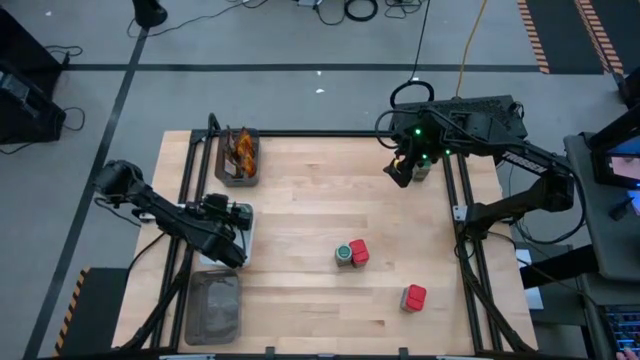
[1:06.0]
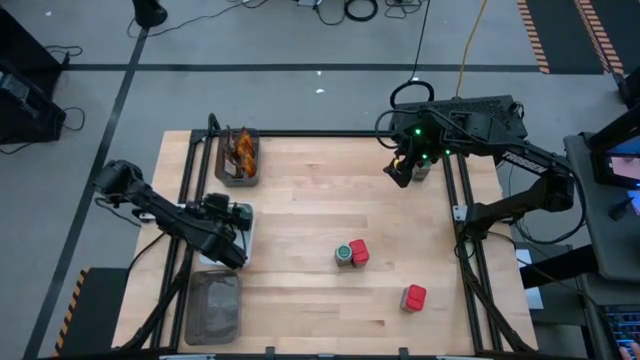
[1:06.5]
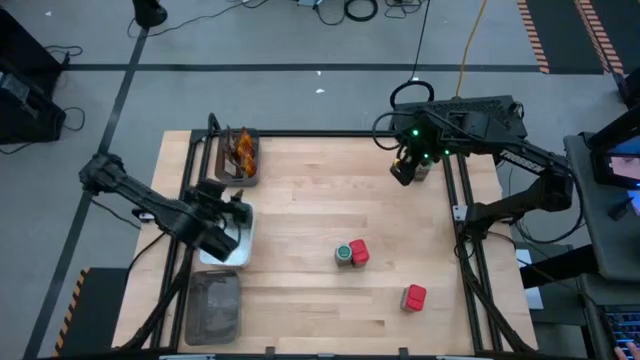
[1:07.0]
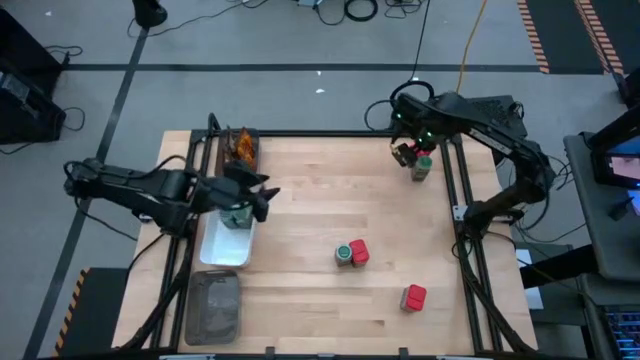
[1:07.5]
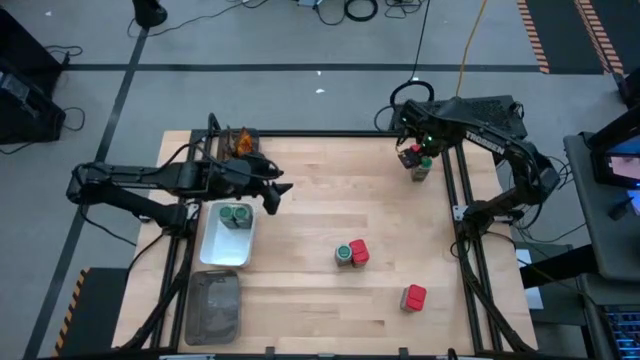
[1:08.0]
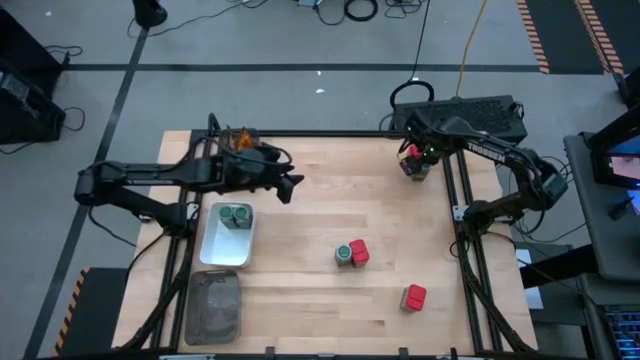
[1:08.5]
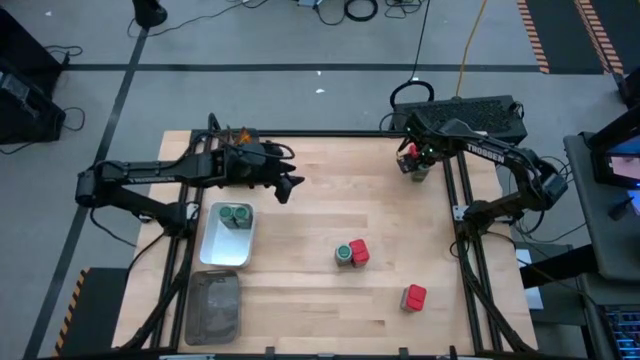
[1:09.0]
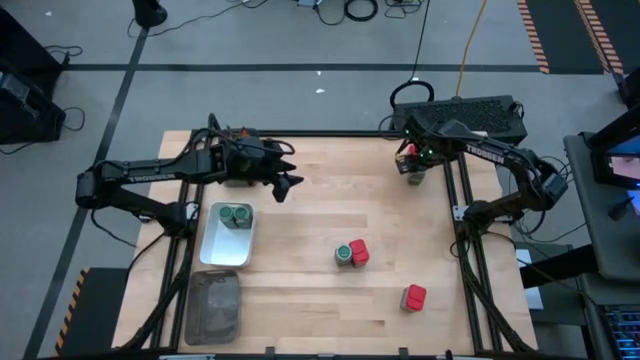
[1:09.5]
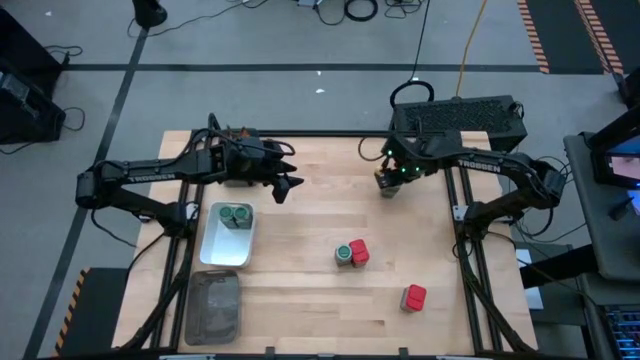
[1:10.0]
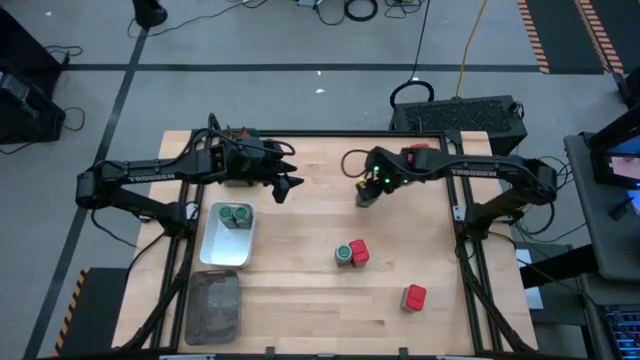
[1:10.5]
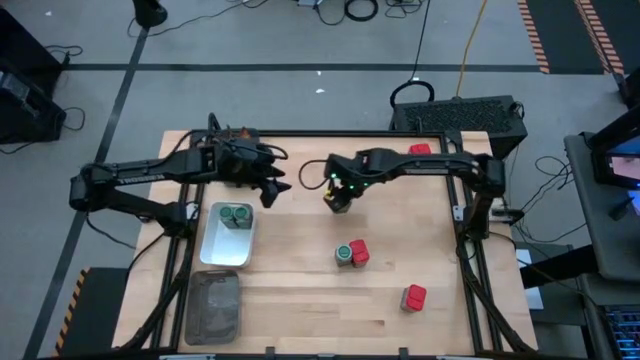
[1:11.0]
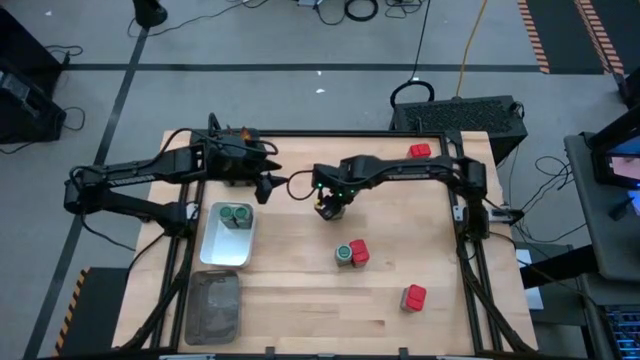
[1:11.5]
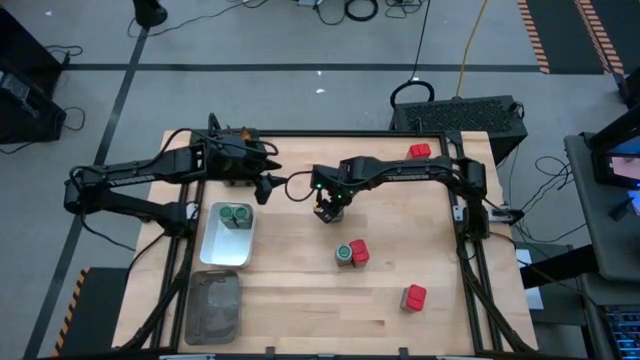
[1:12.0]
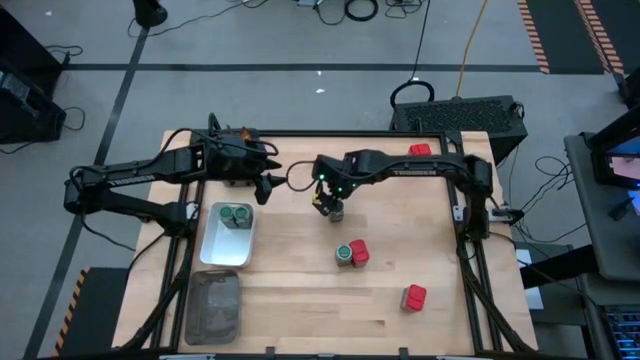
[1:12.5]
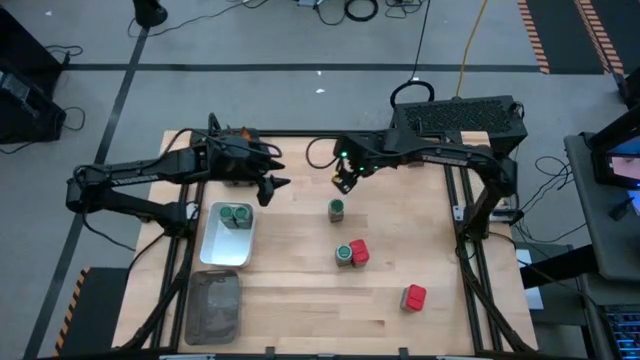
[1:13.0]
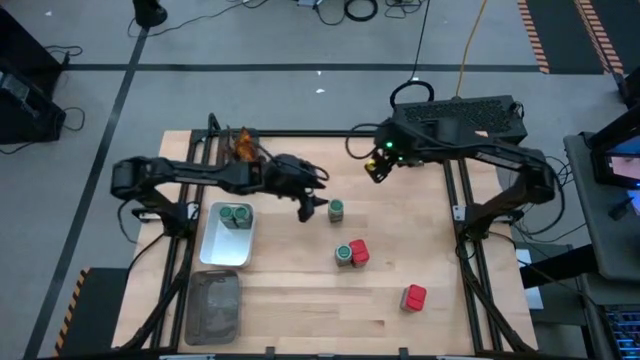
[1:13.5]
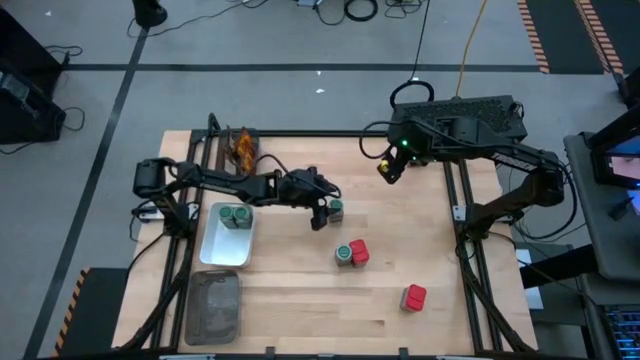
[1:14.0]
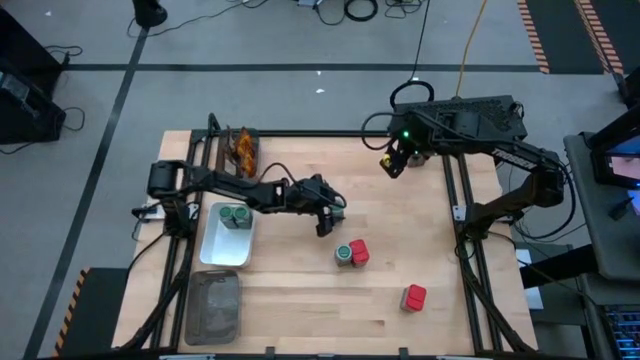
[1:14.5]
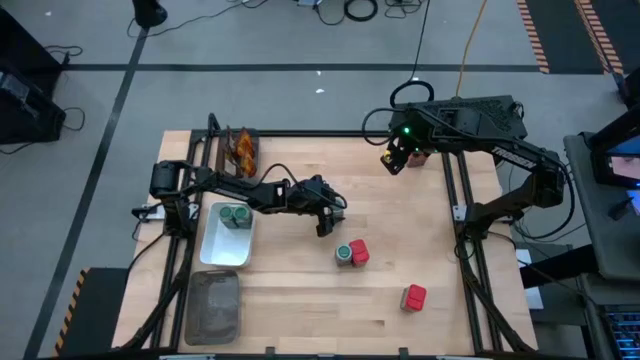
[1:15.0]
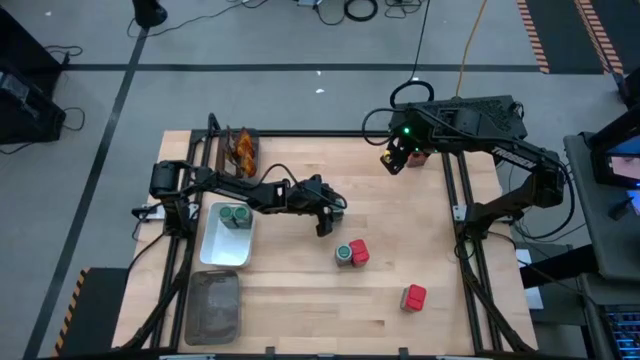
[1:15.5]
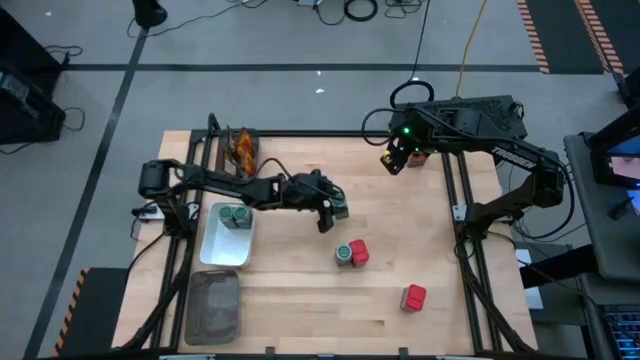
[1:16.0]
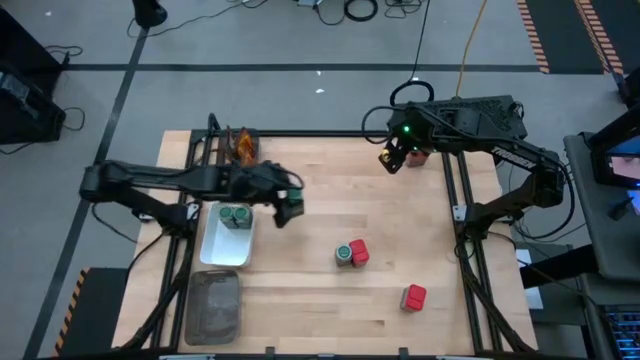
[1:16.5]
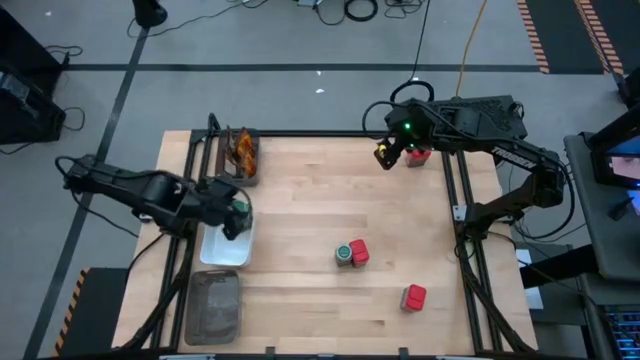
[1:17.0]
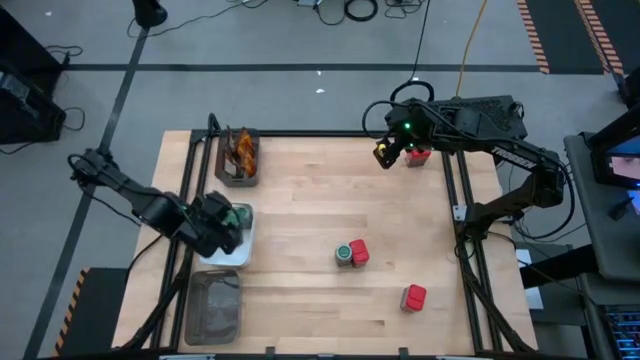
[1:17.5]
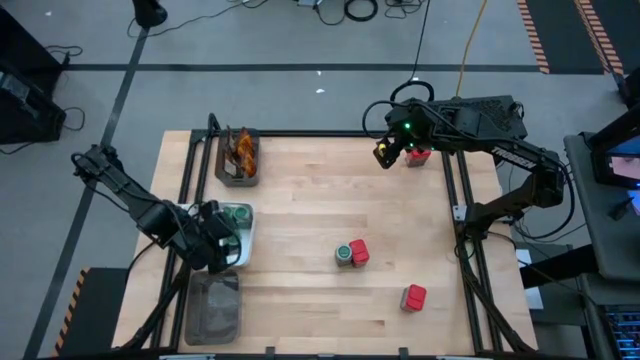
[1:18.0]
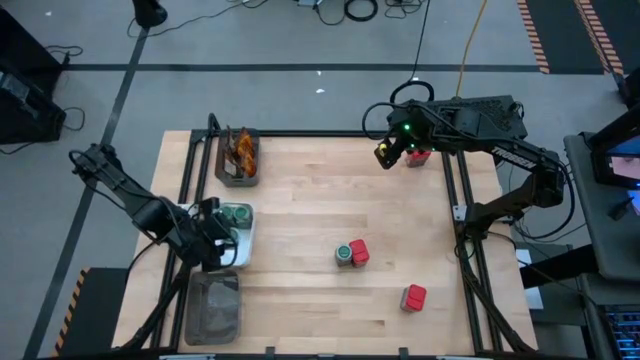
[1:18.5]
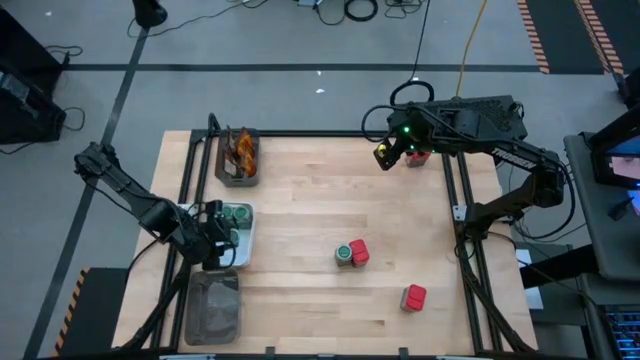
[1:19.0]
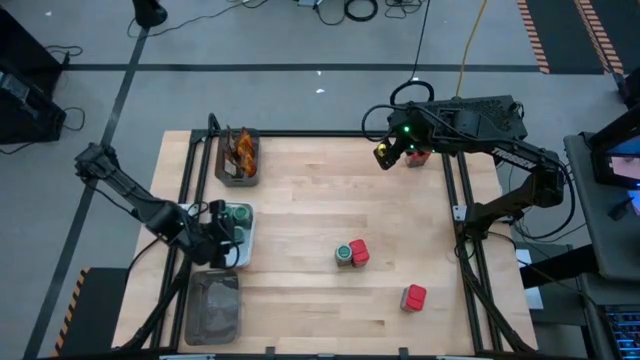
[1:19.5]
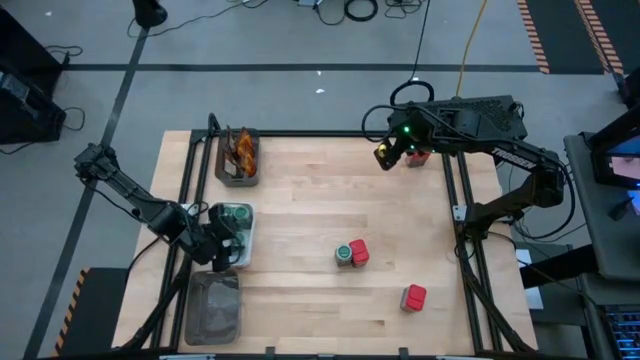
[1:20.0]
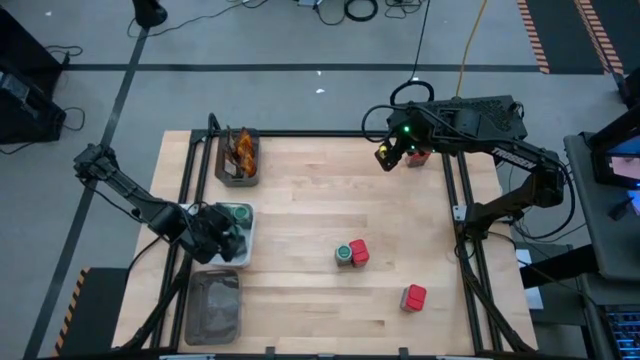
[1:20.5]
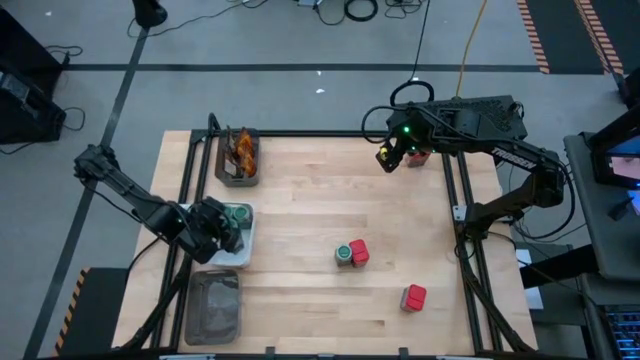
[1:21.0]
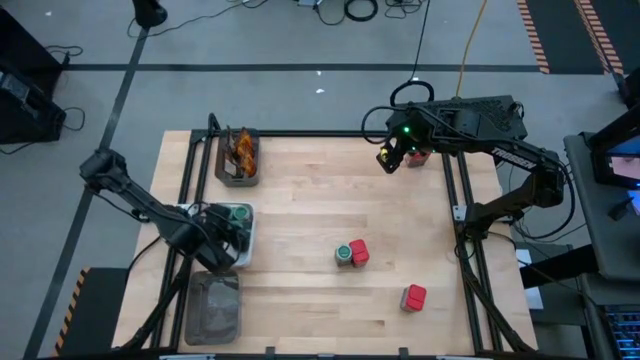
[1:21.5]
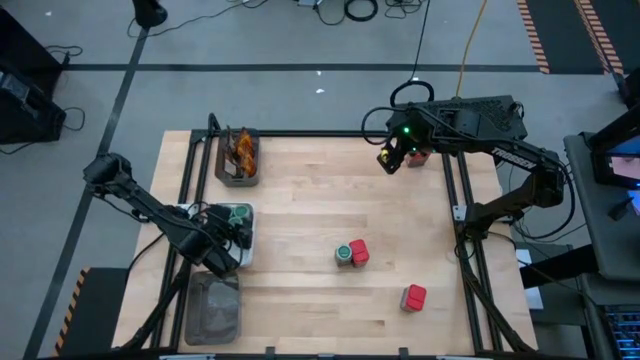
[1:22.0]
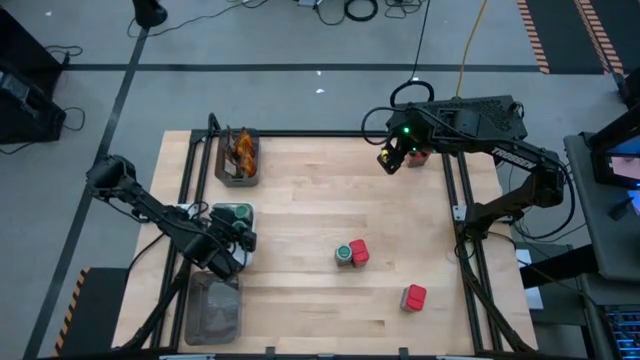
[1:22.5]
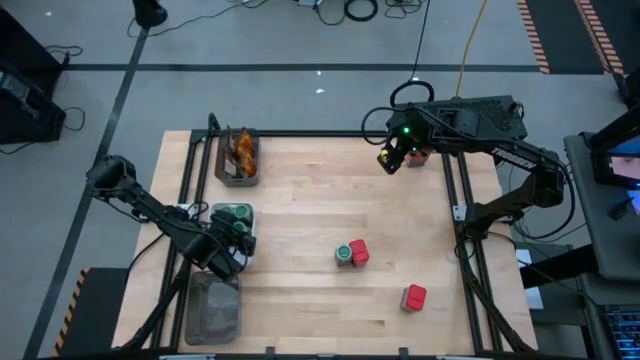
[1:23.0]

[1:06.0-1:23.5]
Task: Sort spices by type
Put the top green seasoning bottle into the white bin

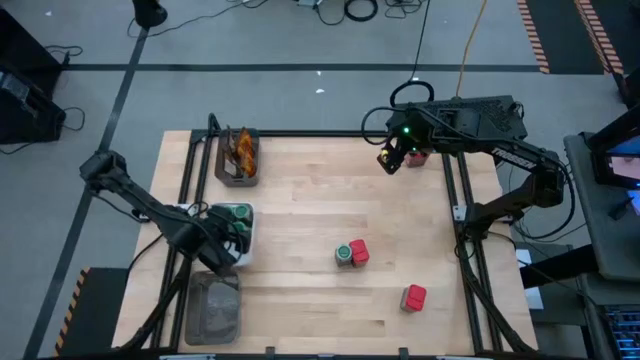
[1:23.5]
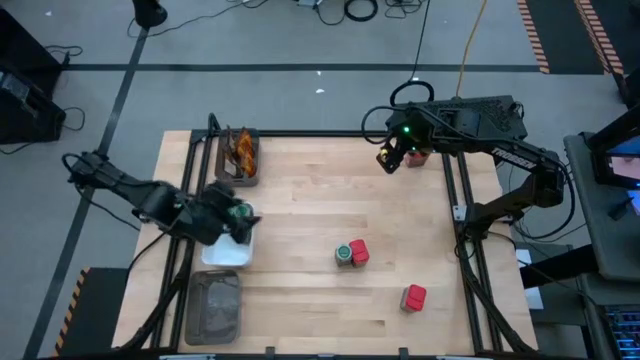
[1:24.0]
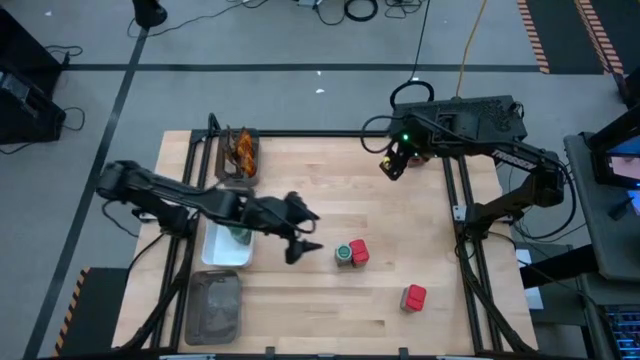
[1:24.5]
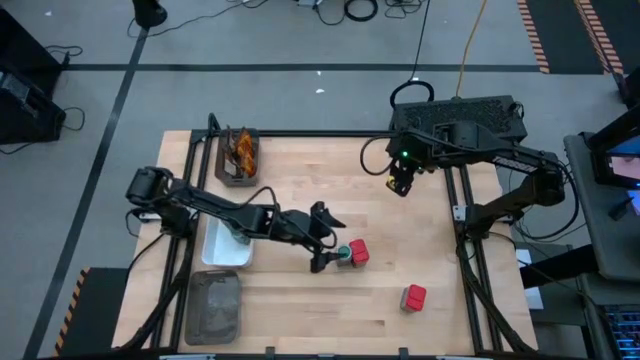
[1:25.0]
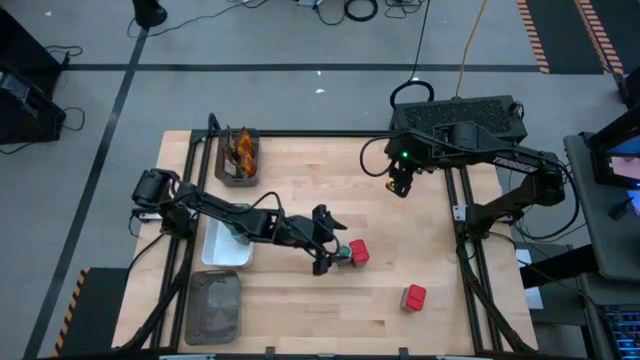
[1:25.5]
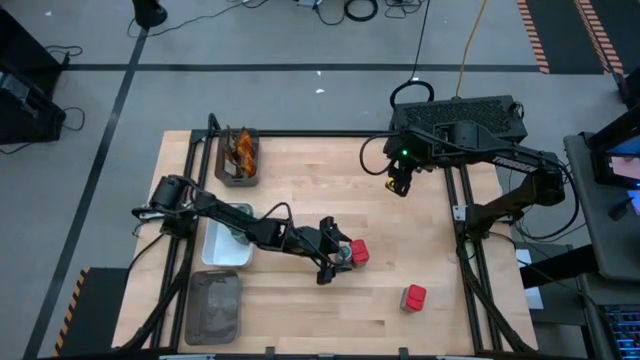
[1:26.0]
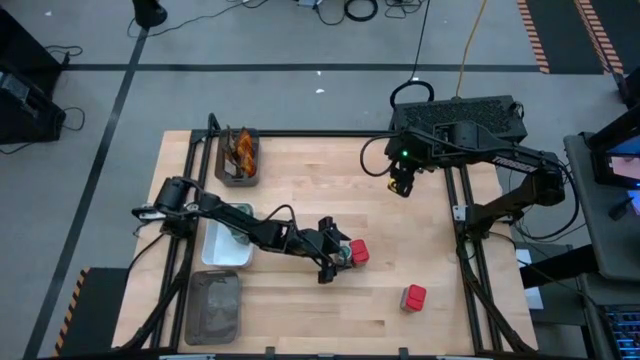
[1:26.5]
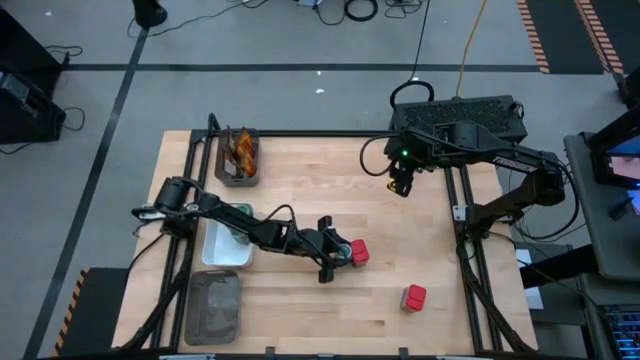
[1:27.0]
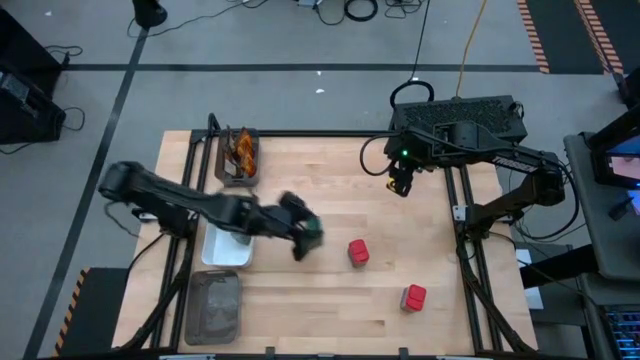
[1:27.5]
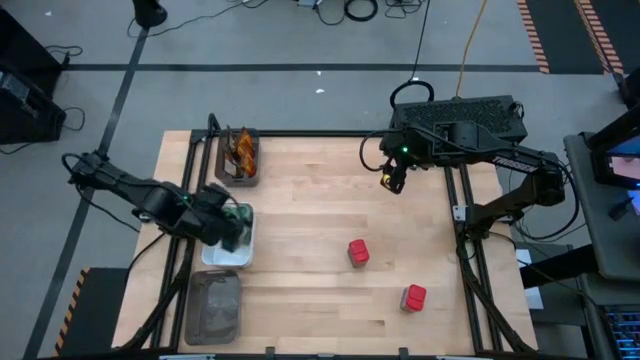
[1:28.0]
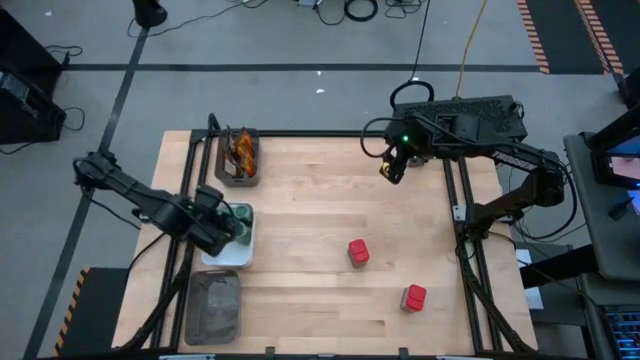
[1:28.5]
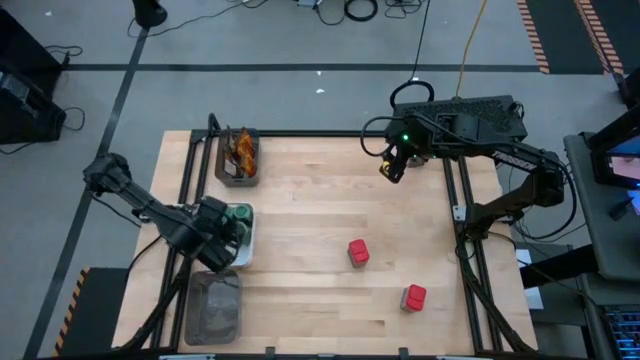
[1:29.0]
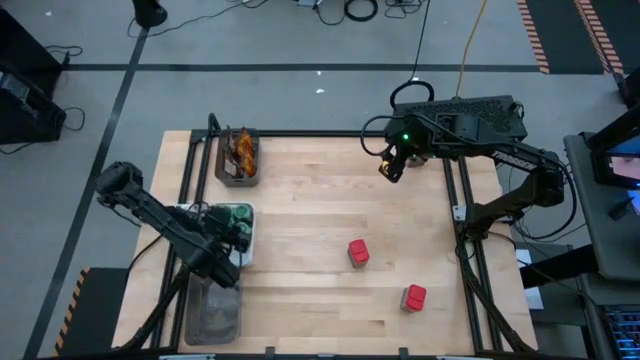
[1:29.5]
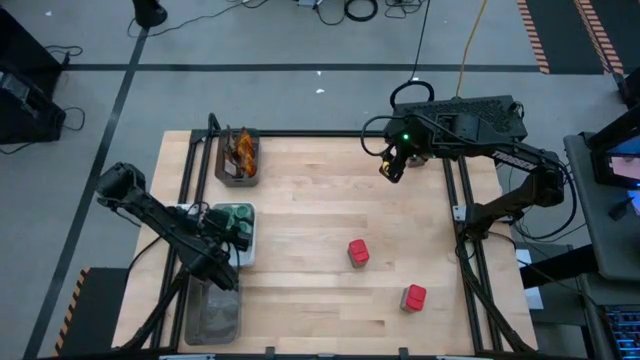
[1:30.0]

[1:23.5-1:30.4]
Put the green seasoning bottle into the white bin
